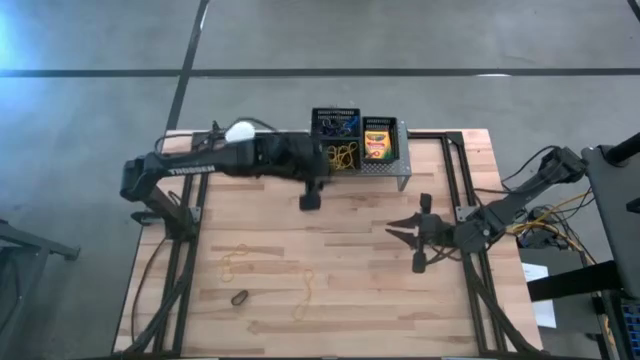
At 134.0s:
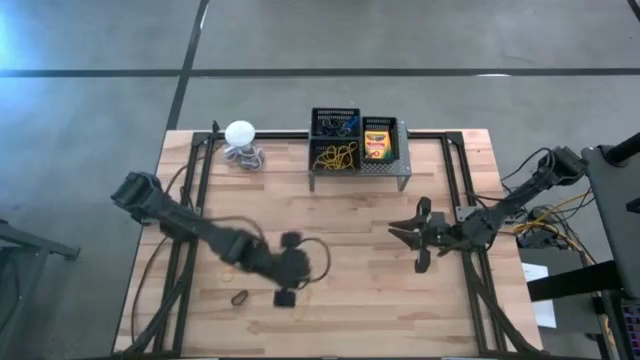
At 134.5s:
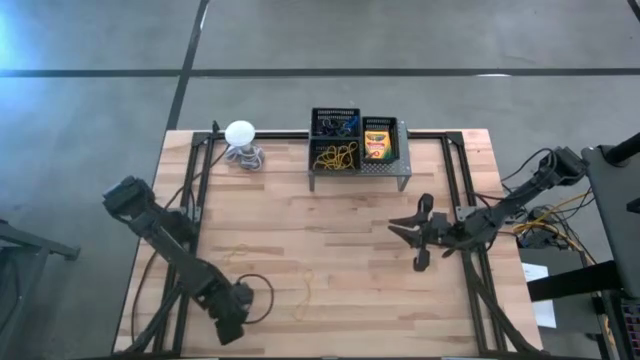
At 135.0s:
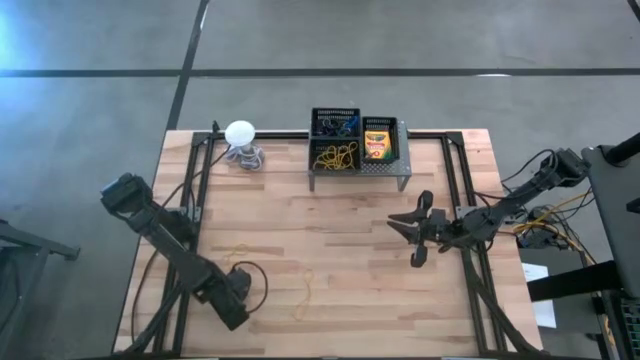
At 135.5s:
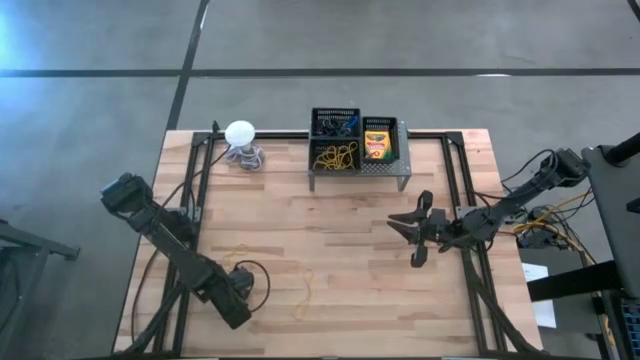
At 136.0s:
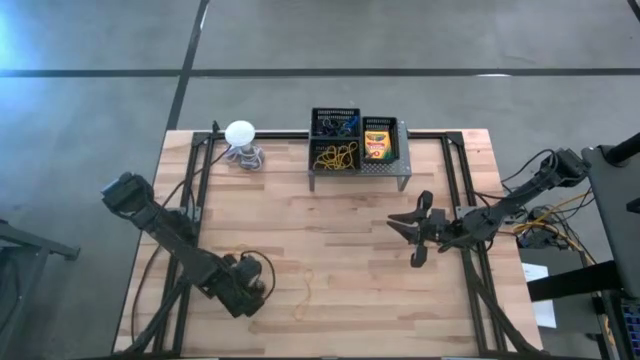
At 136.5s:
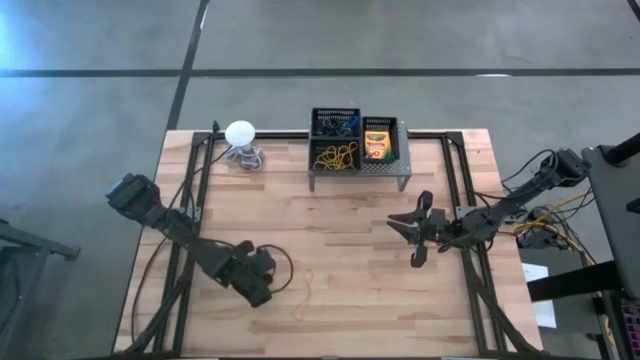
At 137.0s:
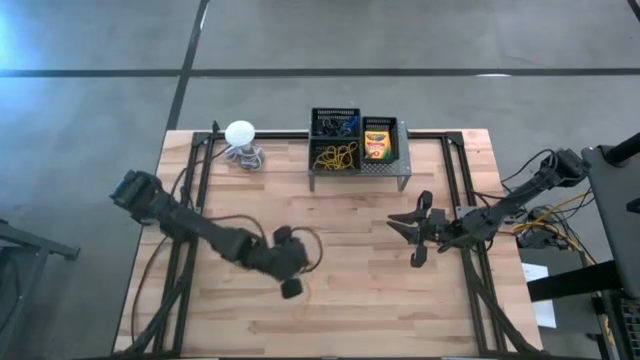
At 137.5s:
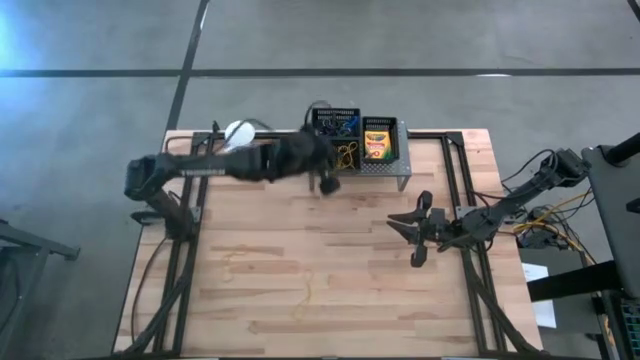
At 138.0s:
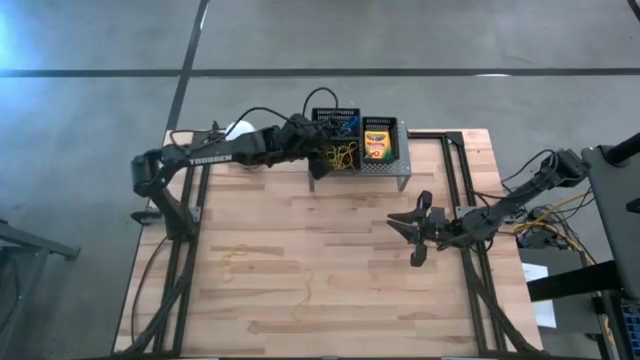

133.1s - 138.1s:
Task: Pick & Place Office Desk Supplies
Put the black rubber band into the bottom left black bin

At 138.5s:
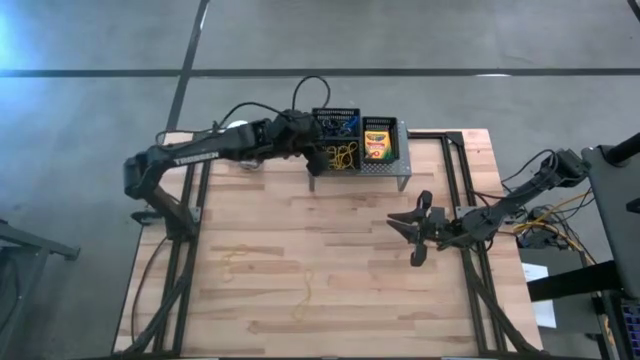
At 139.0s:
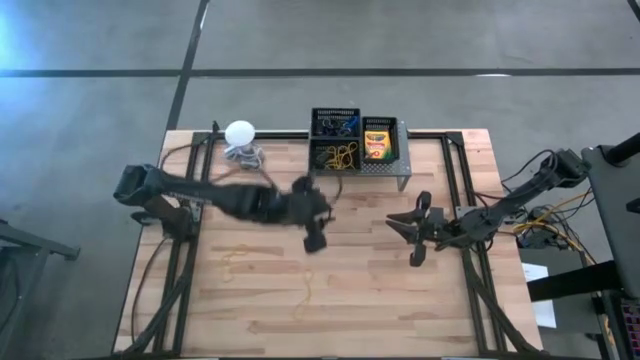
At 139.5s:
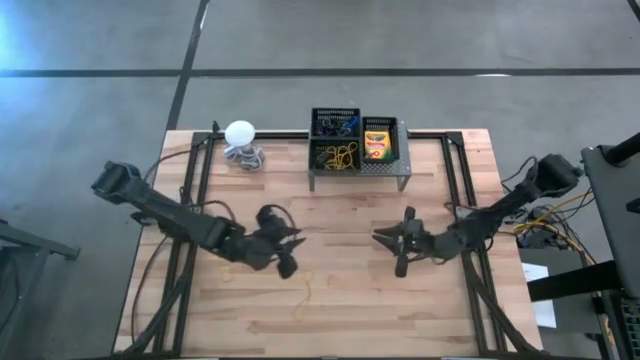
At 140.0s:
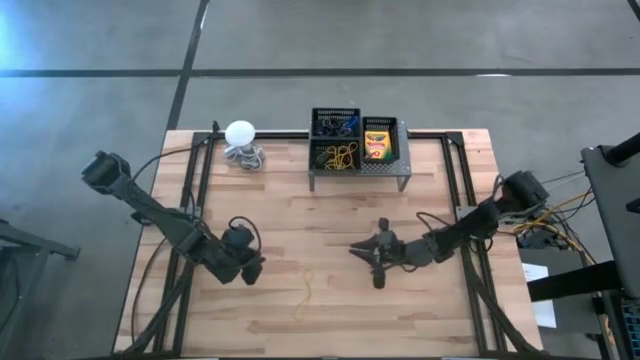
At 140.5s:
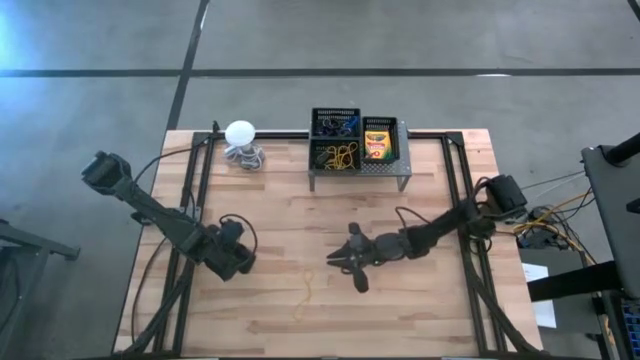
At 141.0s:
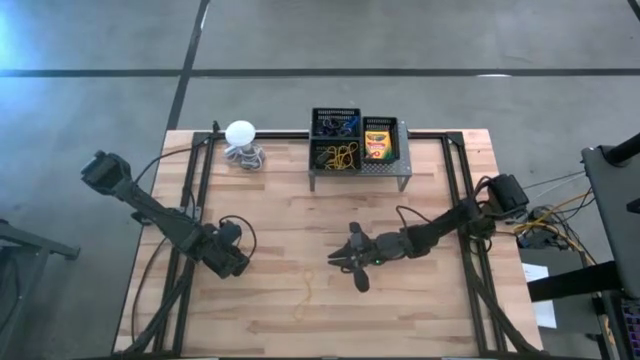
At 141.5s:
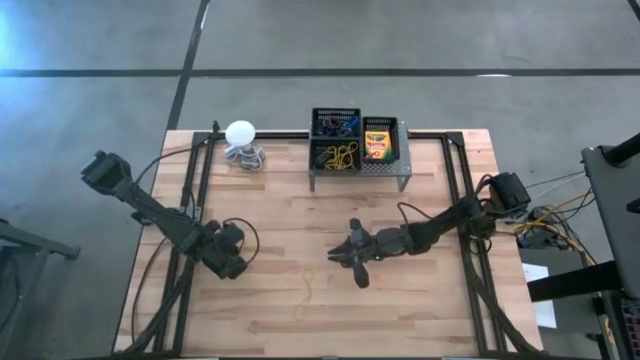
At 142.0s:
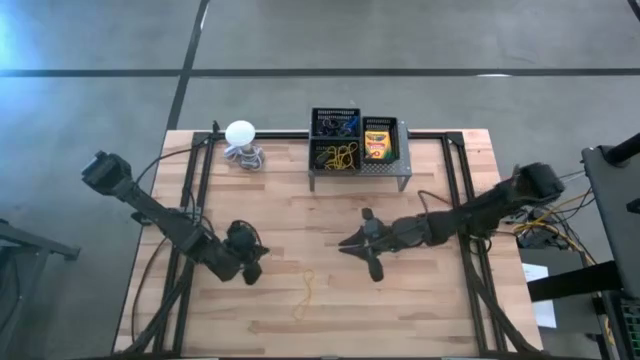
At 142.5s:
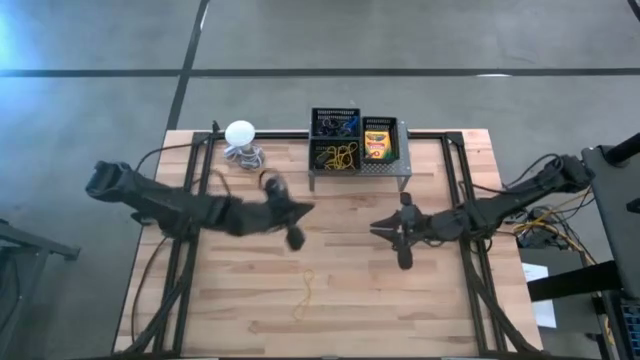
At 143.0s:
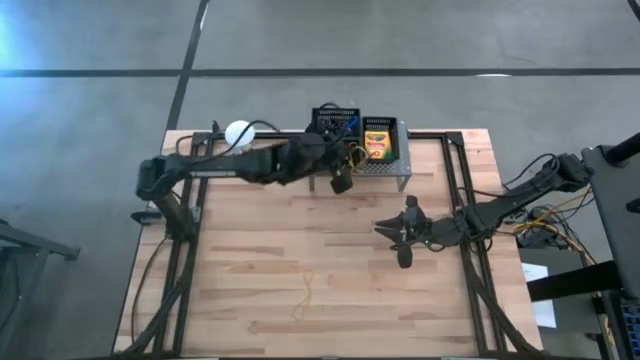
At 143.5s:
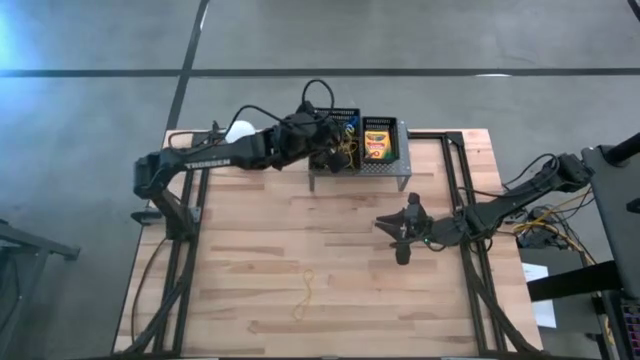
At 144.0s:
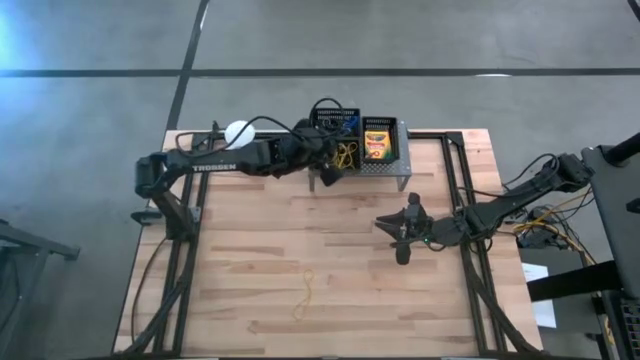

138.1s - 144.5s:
Put the yellow rubber band into the bottom left black bin

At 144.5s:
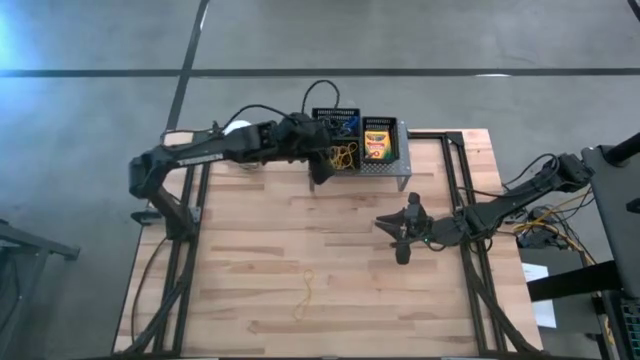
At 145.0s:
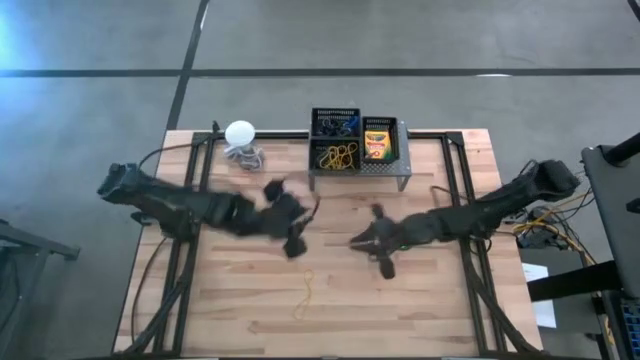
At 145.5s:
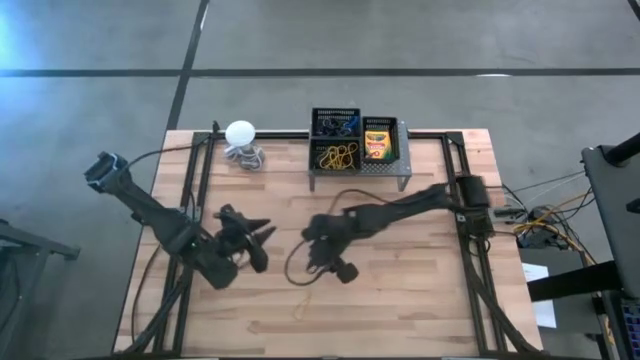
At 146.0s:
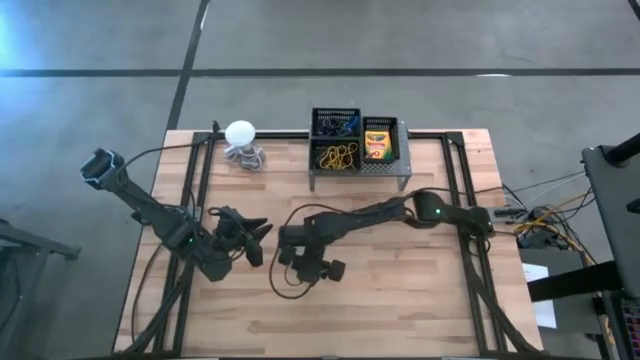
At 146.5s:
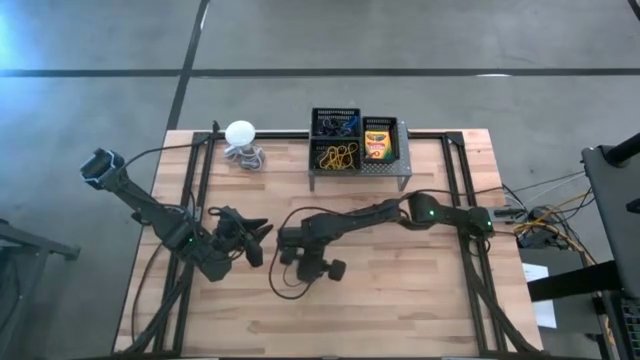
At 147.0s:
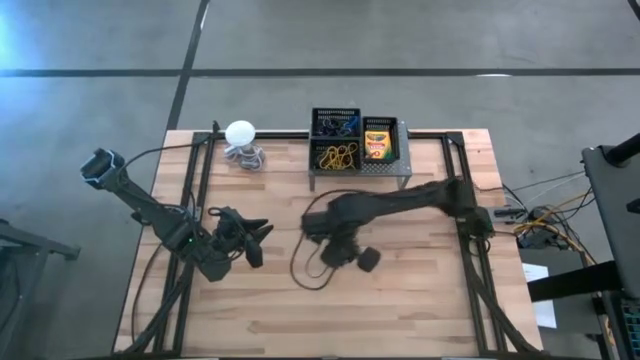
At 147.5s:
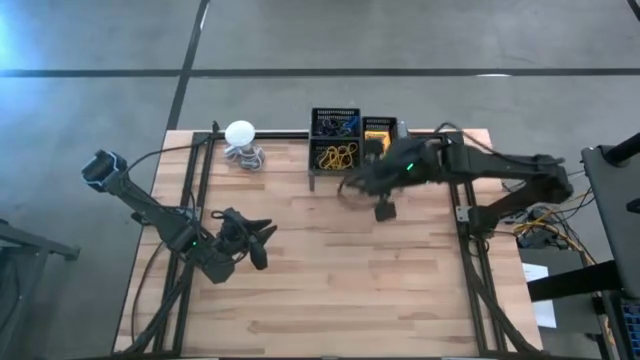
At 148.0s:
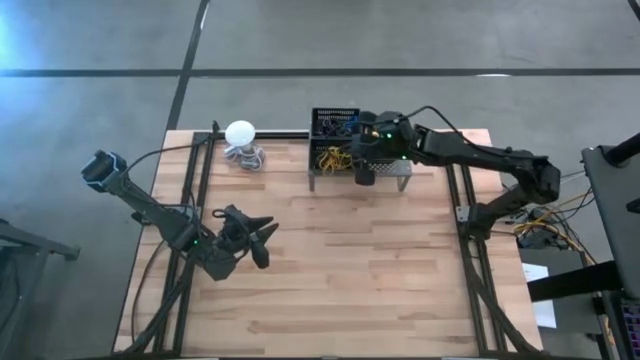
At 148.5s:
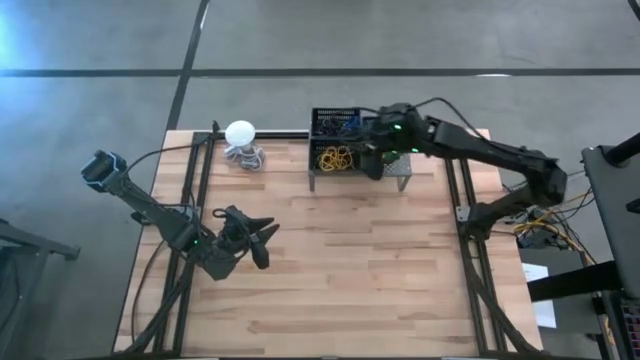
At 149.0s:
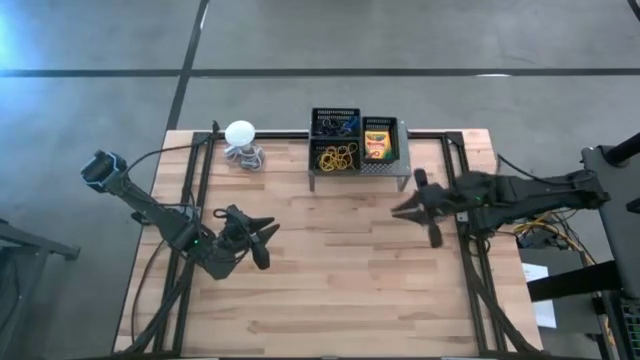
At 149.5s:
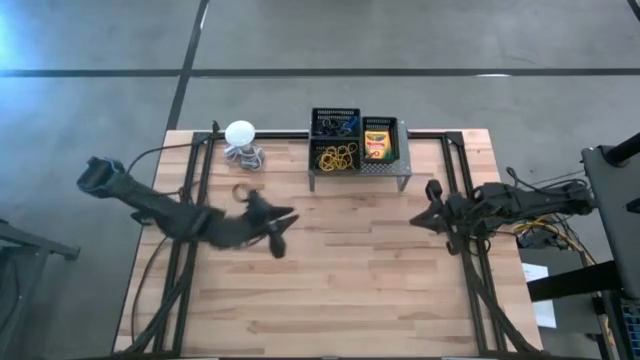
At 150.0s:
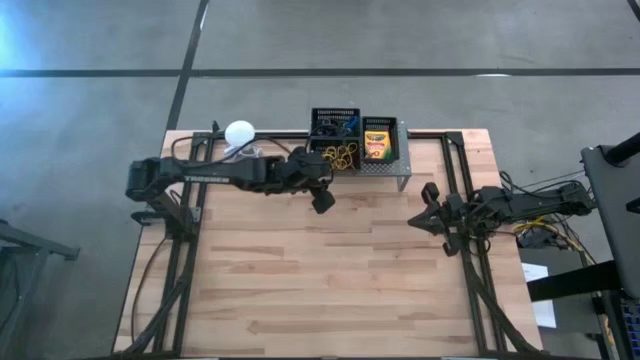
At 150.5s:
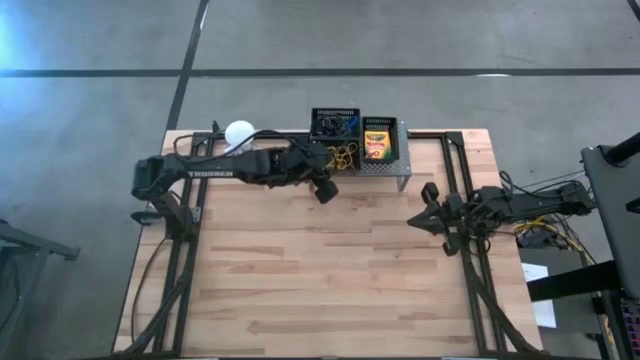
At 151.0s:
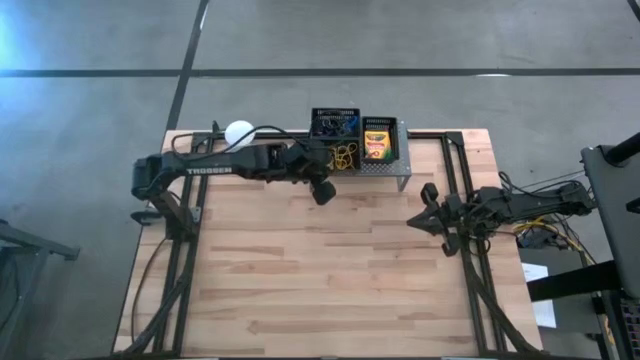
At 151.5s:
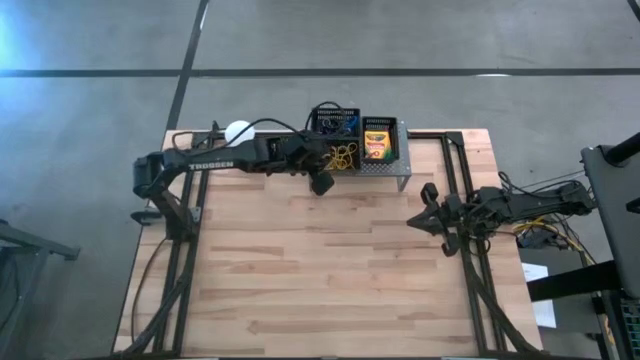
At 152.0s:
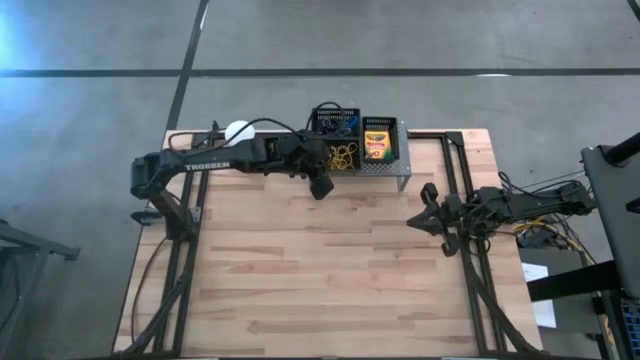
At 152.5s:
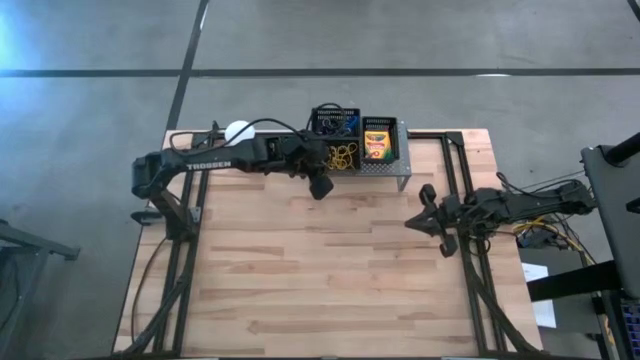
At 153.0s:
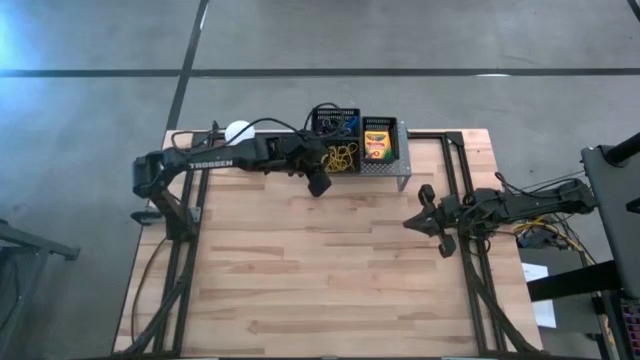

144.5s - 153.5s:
Put the yellow rubber band into the bottom left black bin

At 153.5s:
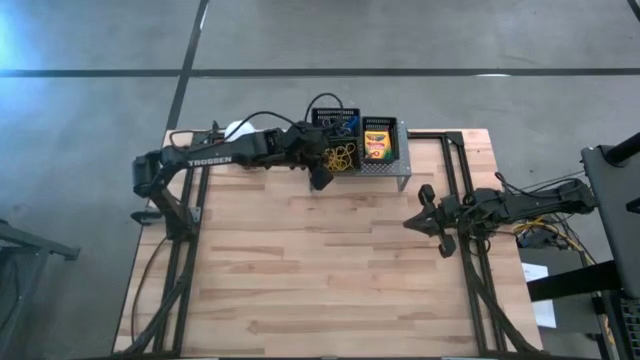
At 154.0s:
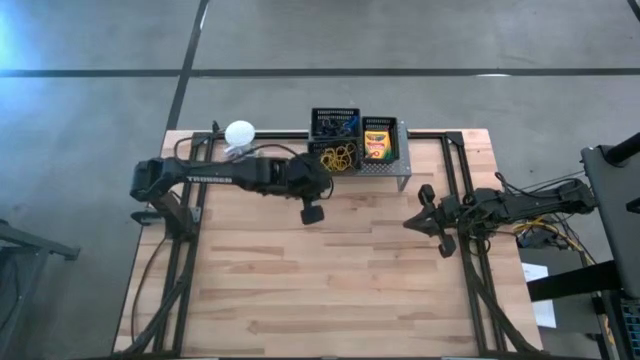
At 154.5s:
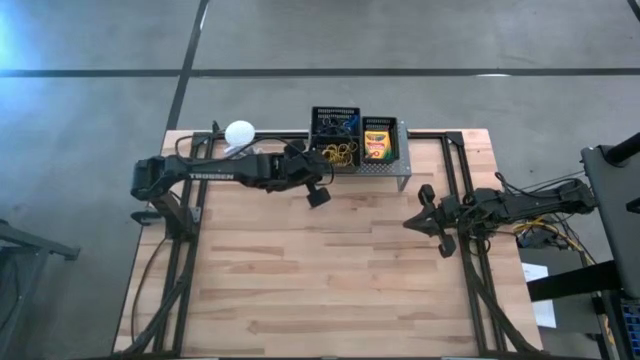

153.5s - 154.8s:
Adjust the bottom left black bin on the shelf
